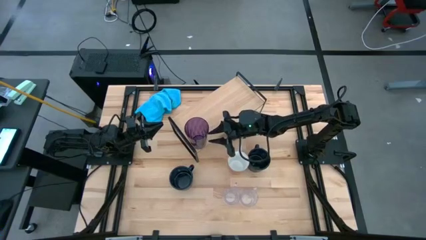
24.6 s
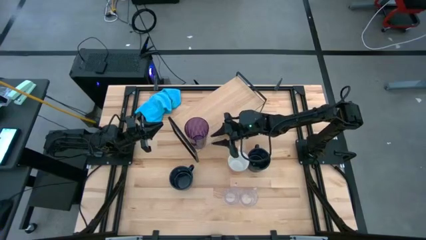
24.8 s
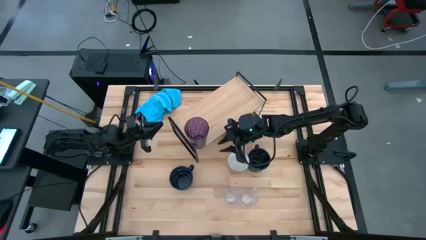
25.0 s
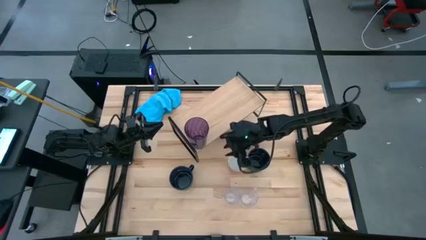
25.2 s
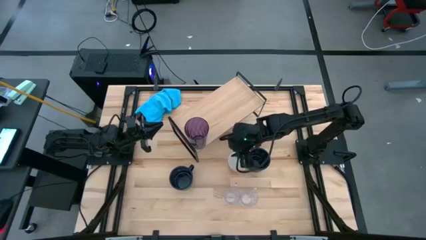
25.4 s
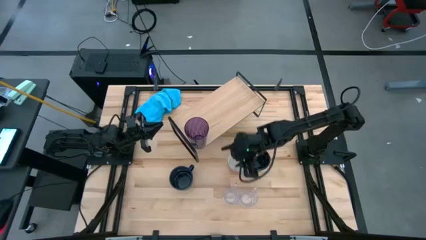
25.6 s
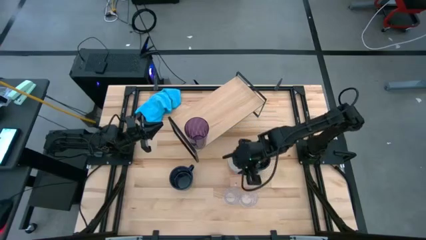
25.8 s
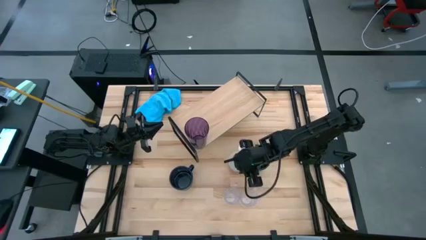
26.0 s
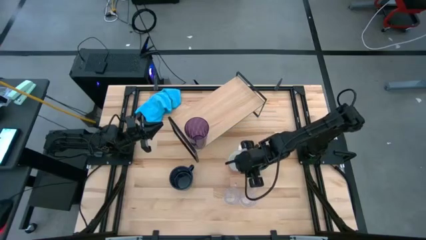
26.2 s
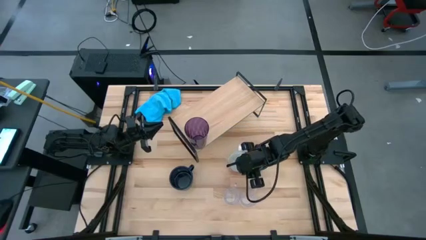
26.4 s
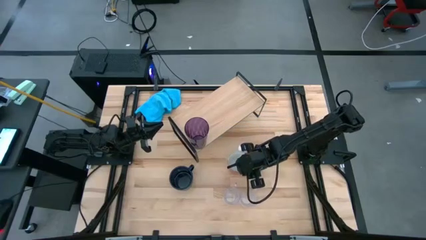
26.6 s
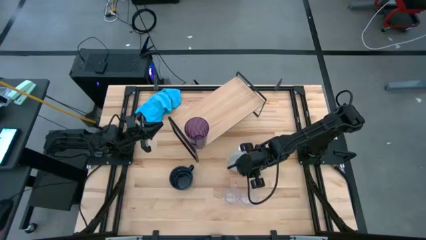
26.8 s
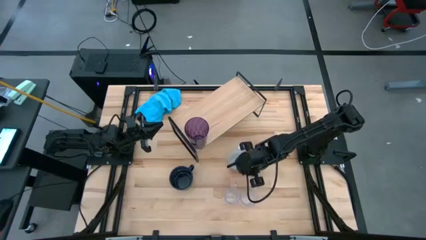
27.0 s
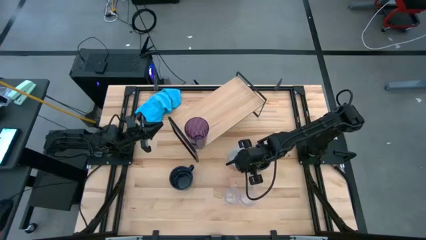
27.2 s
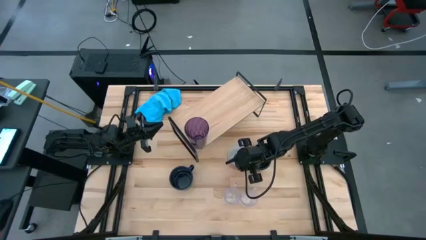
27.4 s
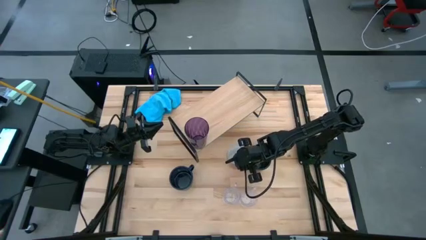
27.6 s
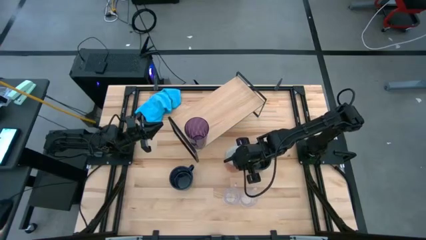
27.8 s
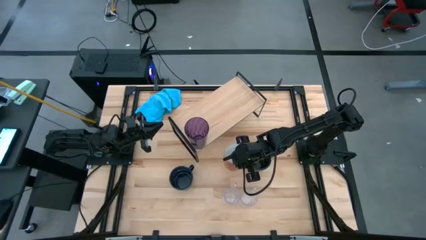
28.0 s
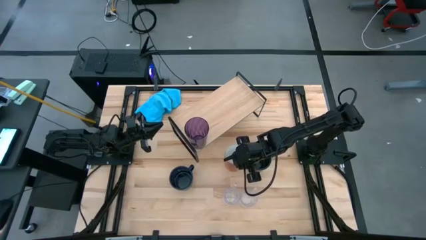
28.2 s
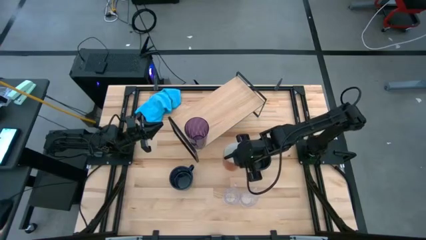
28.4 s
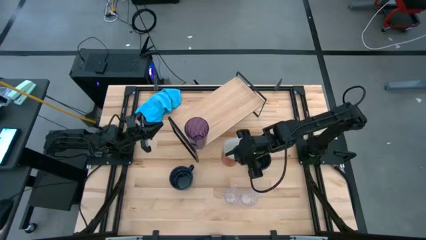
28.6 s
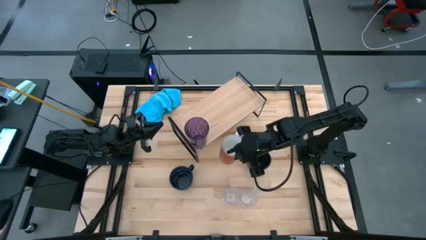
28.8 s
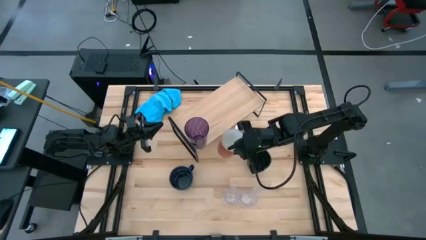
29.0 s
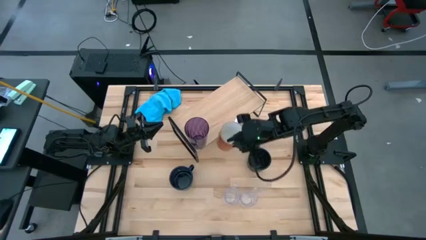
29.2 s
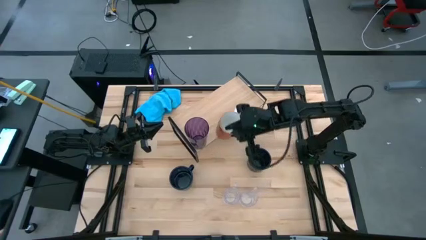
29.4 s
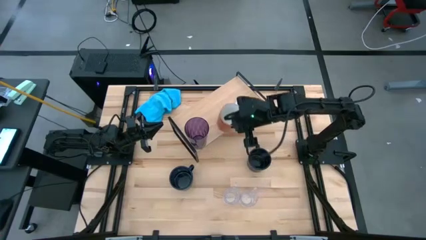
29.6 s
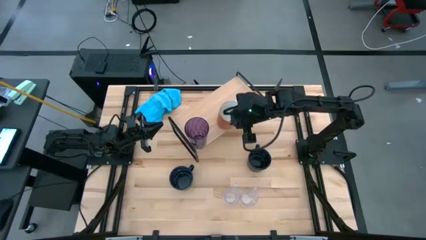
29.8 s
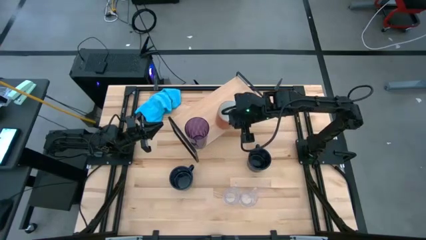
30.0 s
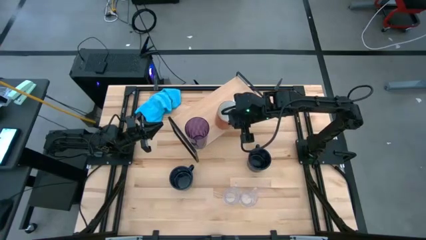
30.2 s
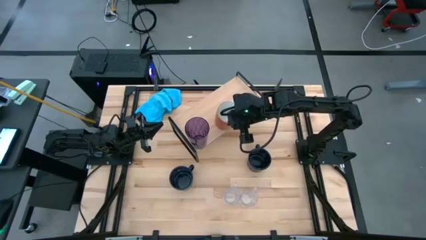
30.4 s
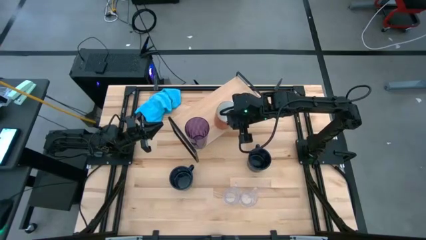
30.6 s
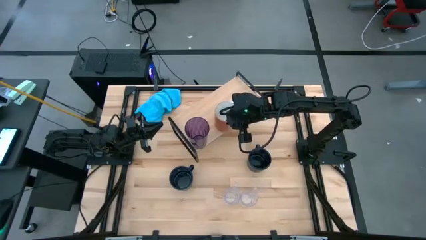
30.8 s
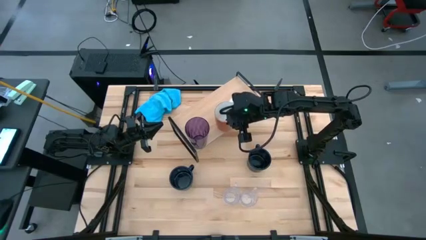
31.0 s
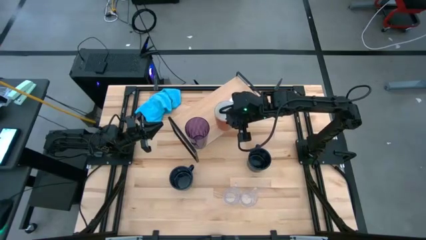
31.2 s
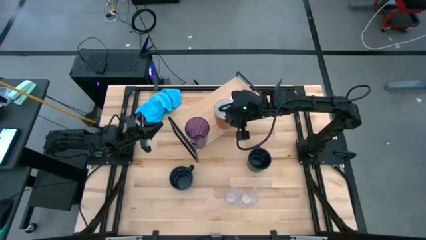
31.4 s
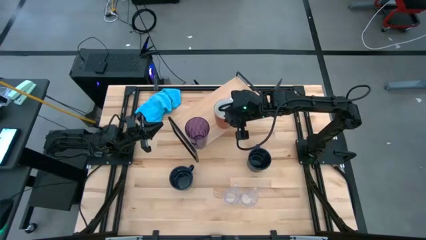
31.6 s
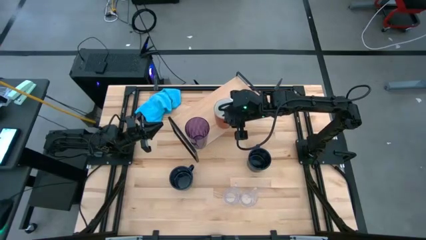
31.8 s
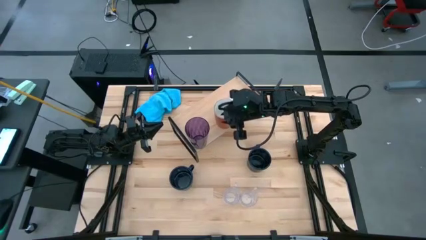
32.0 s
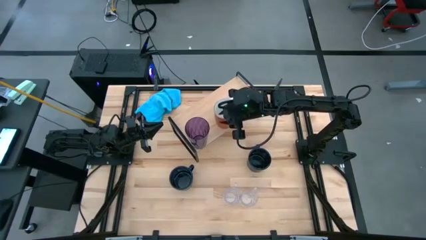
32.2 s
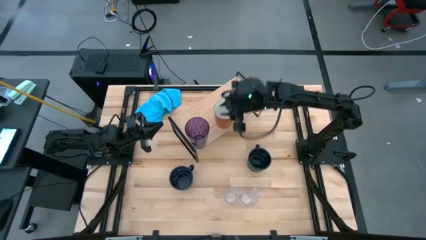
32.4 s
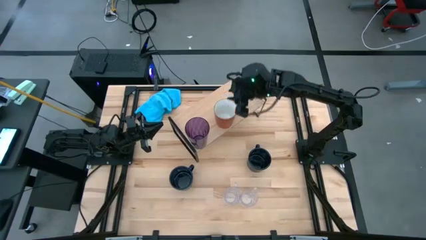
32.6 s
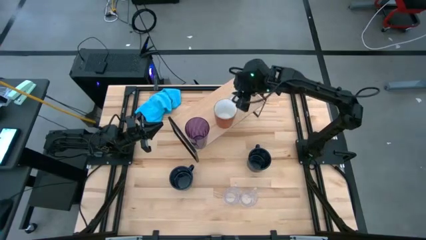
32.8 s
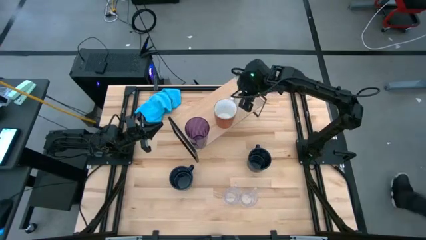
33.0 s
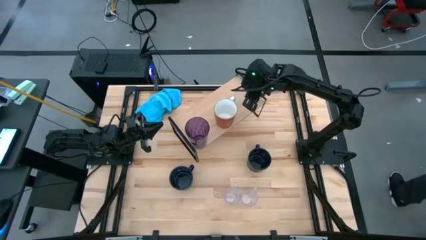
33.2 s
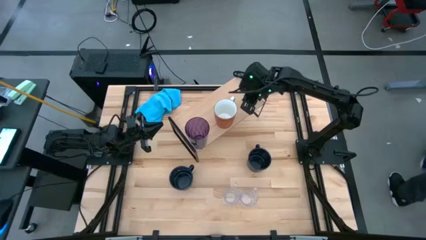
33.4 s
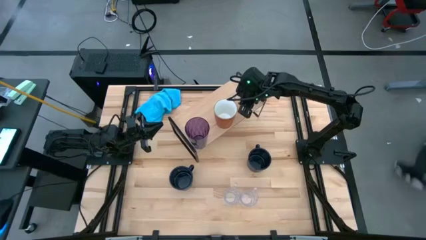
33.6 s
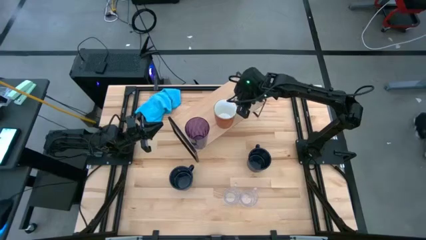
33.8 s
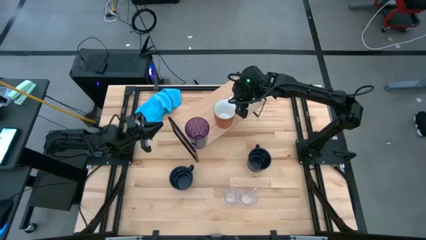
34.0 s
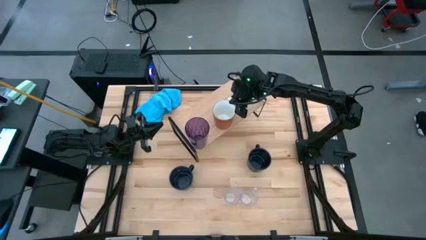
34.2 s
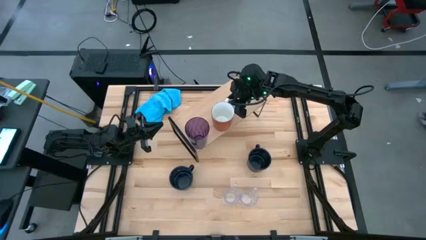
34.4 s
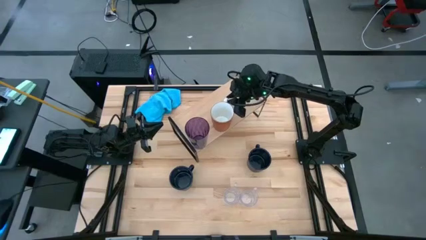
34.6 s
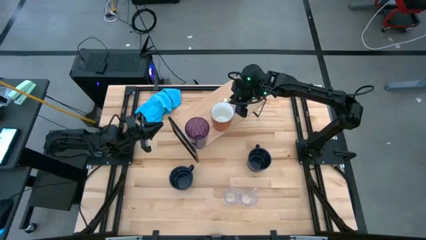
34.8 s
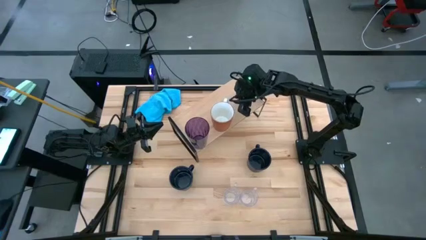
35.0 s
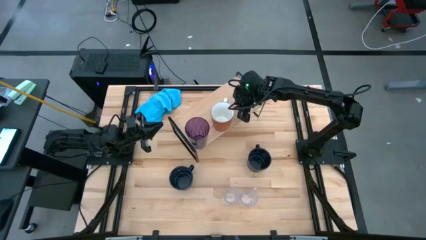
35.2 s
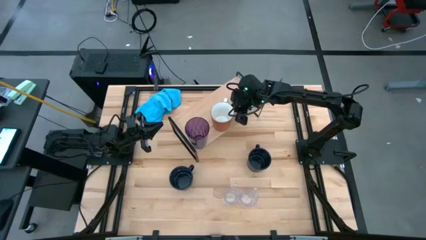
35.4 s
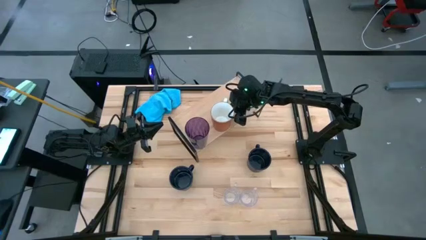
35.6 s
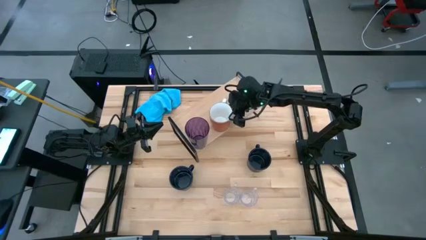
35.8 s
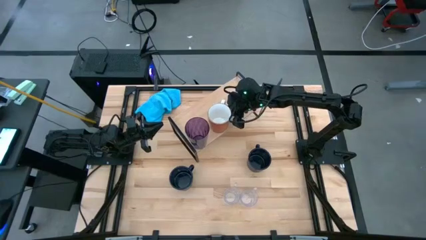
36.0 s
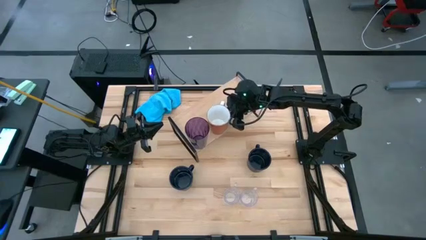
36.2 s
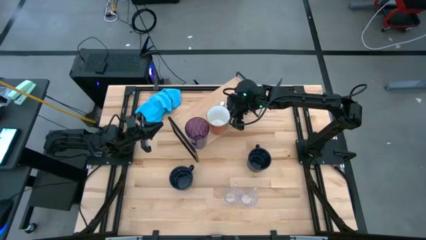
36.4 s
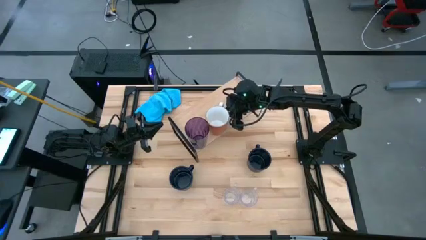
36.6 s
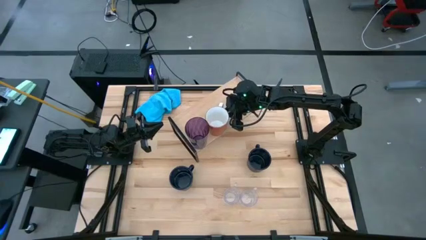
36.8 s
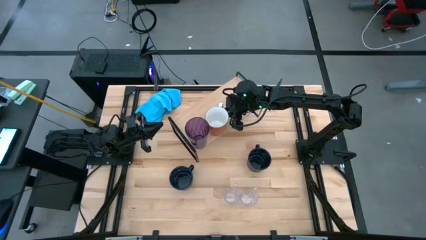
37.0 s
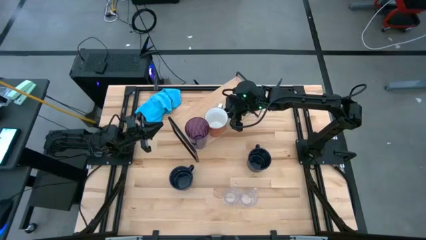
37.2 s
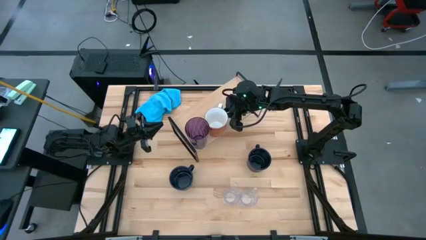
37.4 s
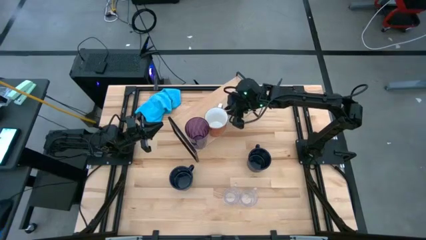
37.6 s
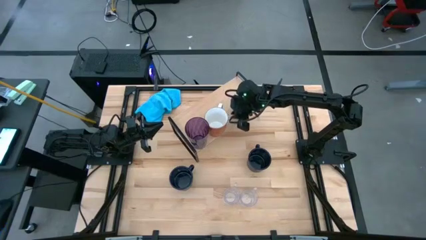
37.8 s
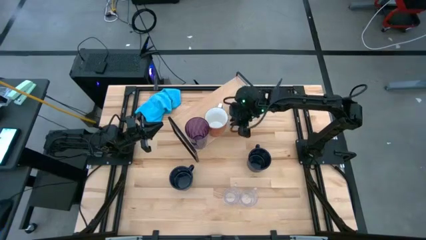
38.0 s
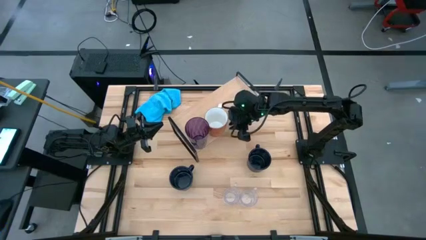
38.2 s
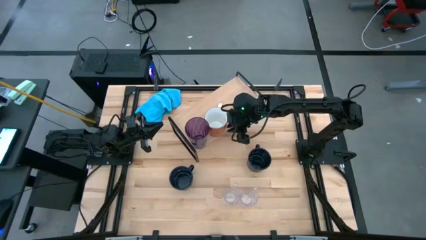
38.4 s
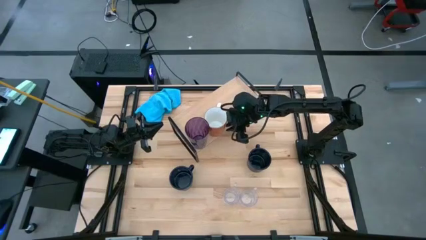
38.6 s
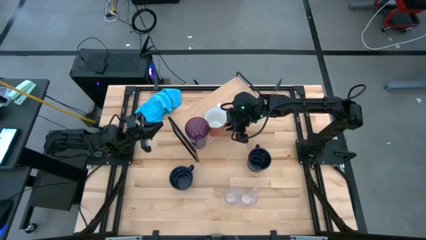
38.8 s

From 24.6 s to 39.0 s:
Task: Stack small to large cups/mugs on shelf
Put the orange mug on the shelf
